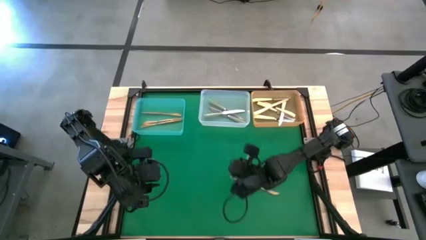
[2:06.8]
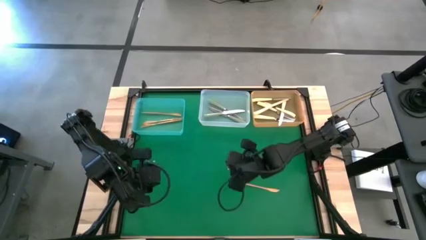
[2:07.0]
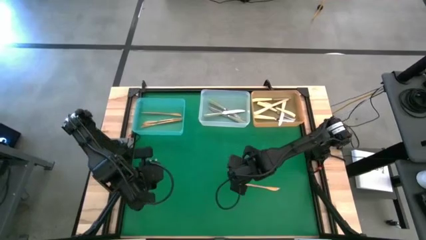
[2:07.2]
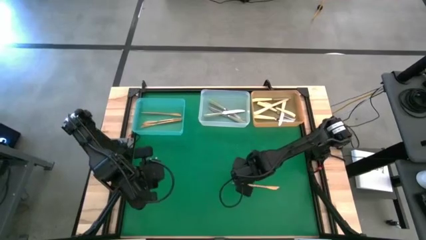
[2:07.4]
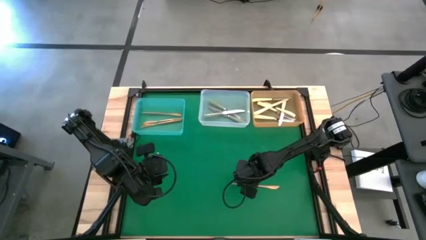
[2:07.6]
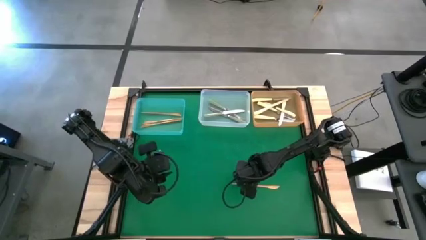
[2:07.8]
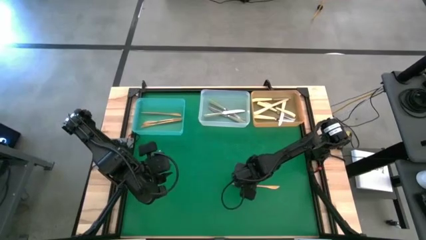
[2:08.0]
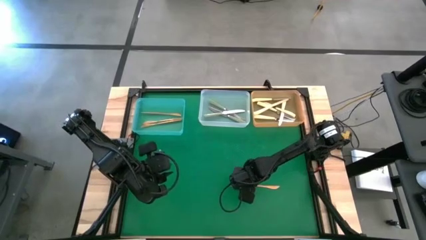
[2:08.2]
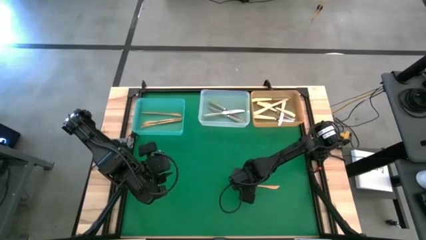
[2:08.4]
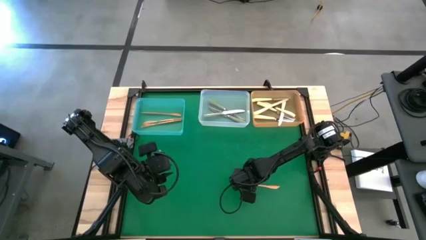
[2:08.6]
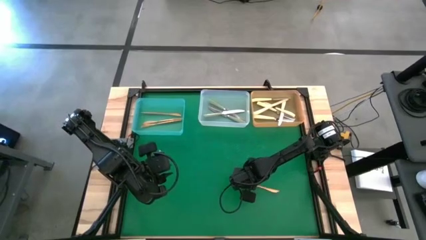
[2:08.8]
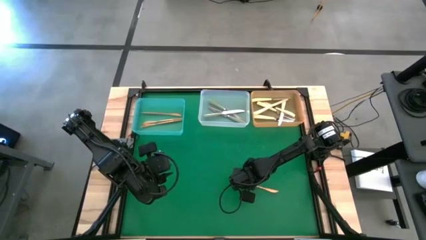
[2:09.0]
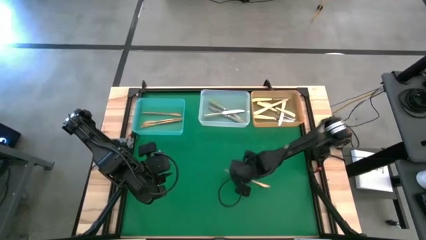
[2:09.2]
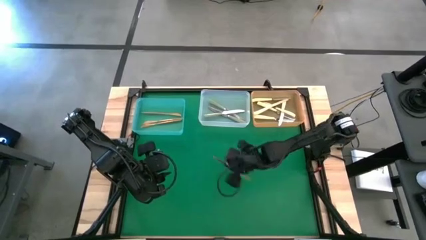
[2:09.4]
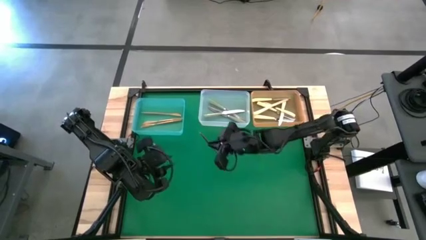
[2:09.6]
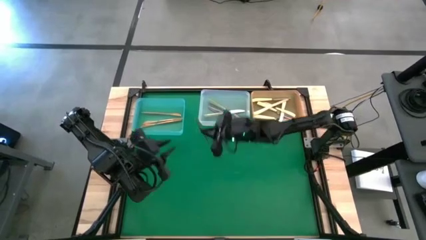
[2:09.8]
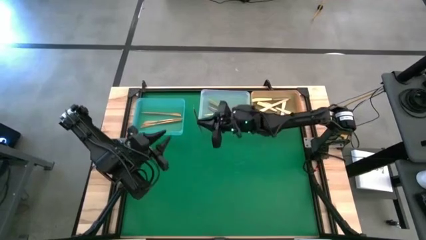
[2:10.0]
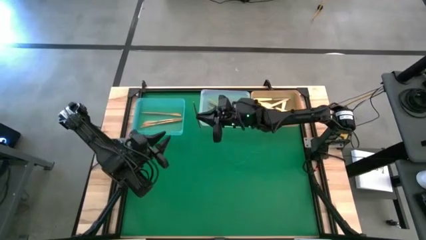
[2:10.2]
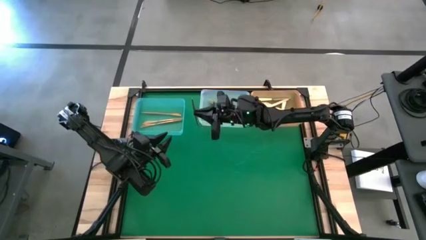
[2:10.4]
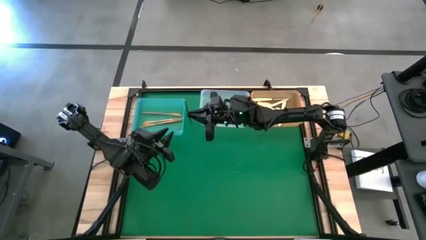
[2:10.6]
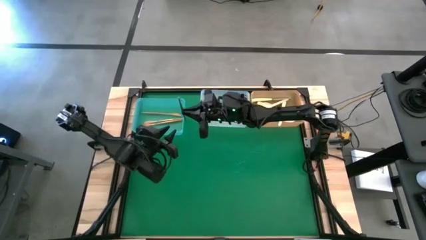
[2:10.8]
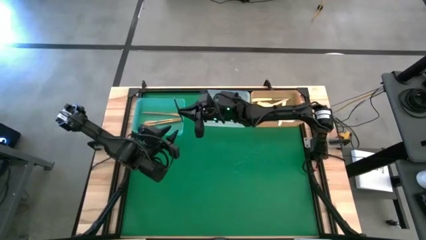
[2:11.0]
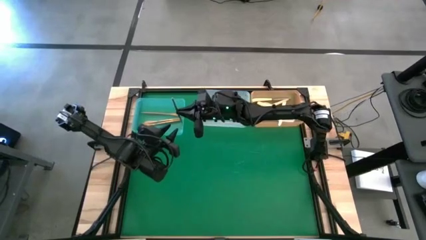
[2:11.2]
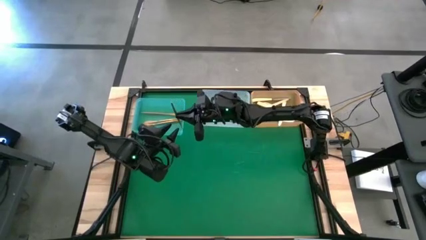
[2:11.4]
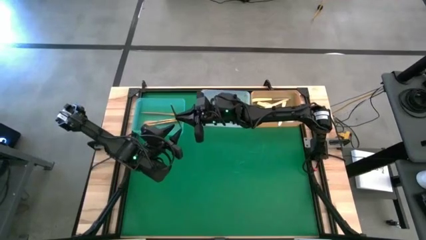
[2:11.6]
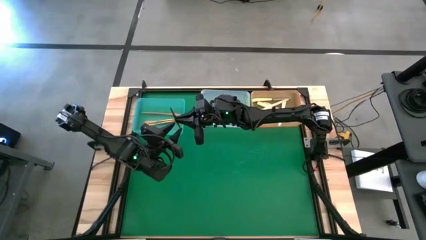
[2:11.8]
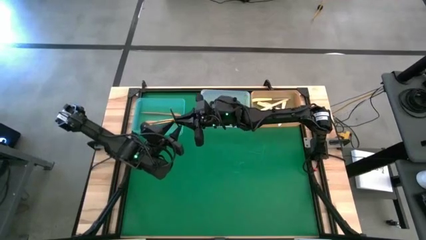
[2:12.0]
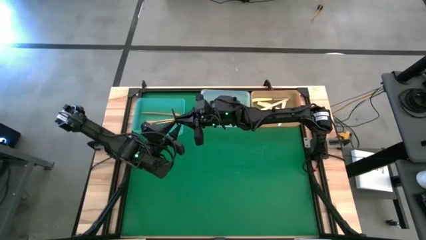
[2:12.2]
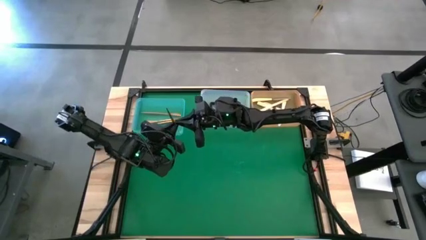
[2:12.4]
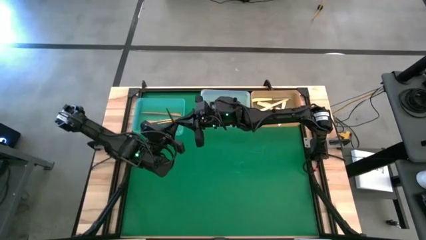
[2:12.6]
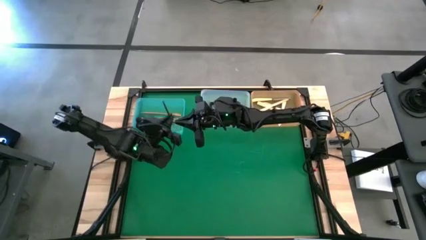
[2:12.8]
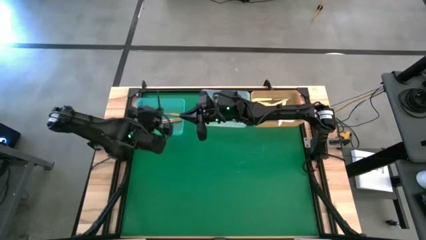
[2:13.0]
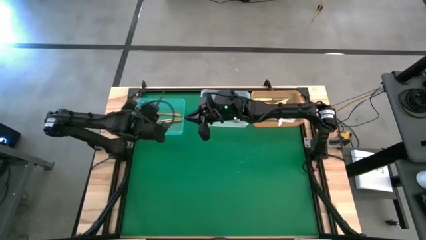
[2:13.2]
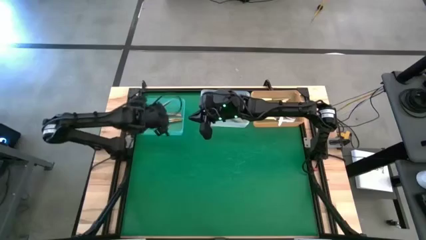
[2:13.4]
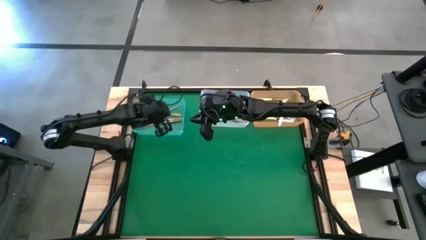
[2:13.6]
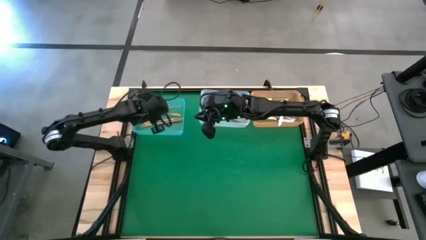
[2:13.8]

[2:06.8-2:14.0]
Task: Sort silverware by color (type)
Put the gold knife into the blue bin

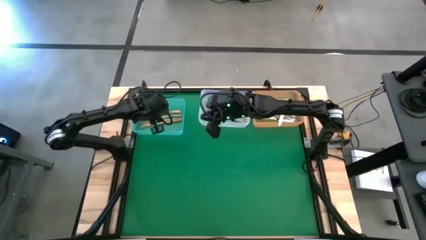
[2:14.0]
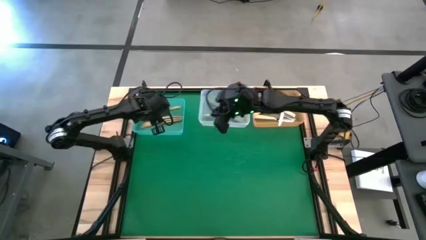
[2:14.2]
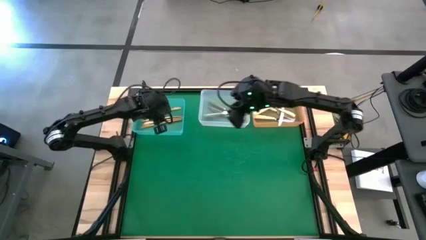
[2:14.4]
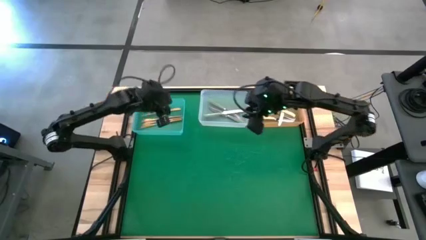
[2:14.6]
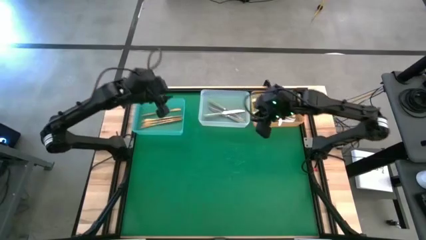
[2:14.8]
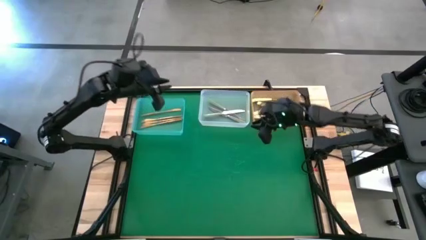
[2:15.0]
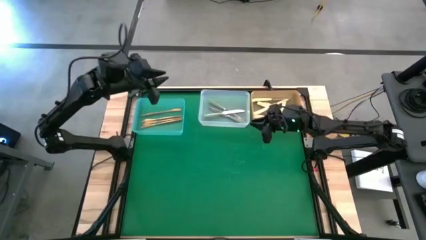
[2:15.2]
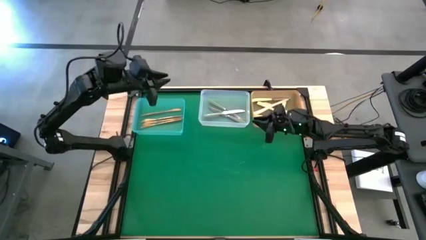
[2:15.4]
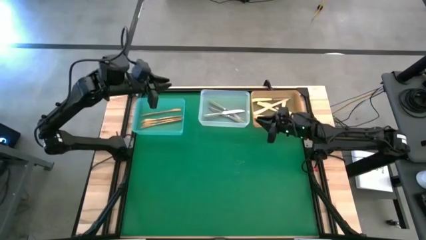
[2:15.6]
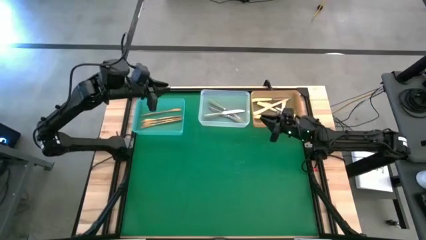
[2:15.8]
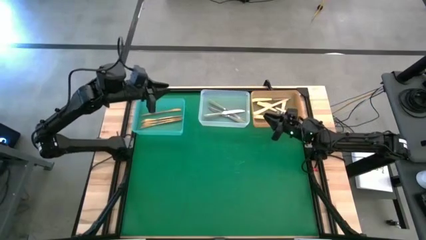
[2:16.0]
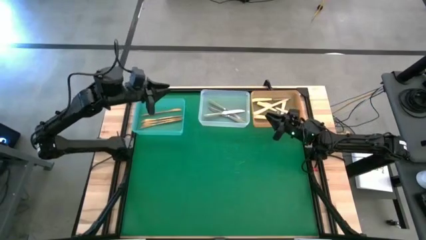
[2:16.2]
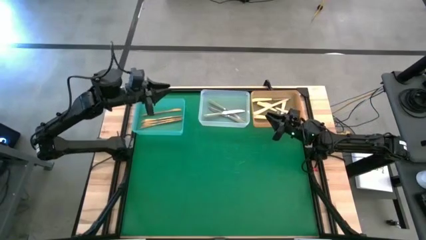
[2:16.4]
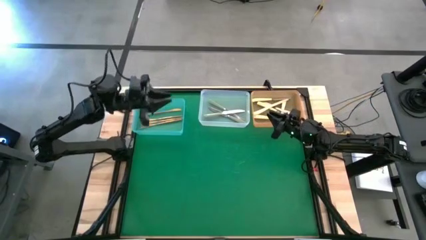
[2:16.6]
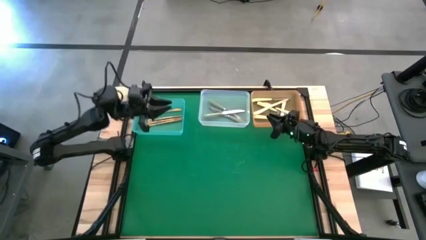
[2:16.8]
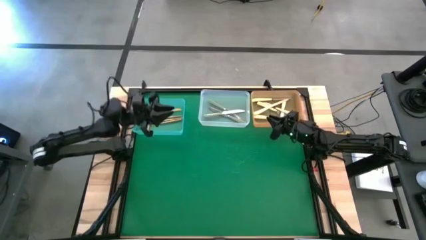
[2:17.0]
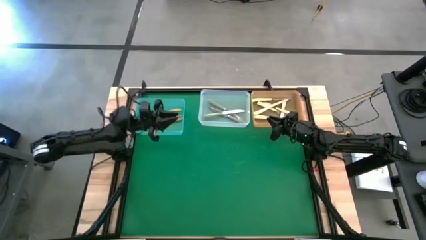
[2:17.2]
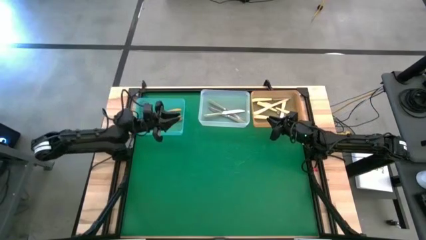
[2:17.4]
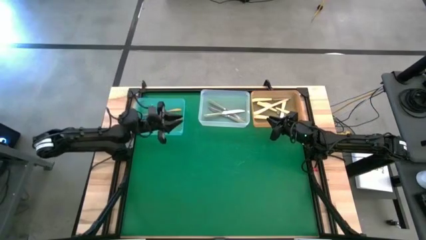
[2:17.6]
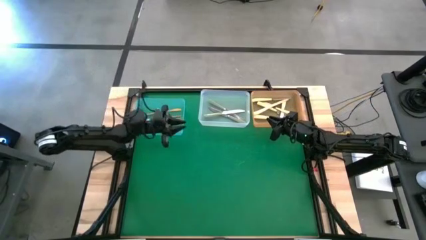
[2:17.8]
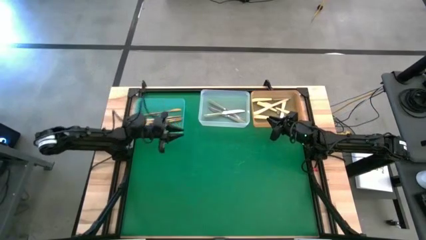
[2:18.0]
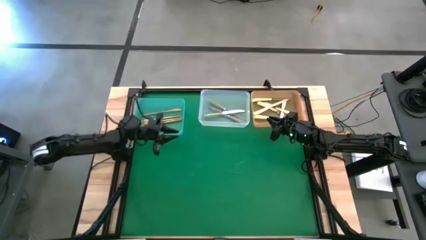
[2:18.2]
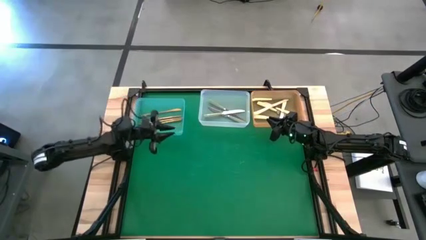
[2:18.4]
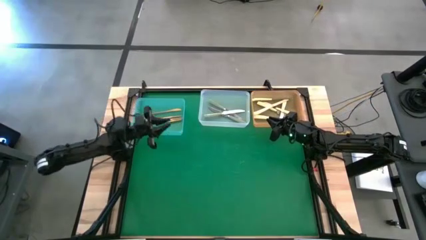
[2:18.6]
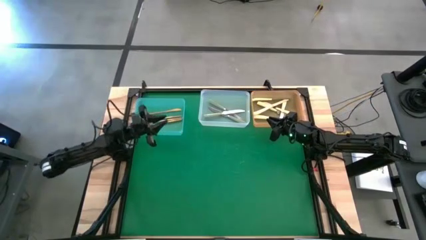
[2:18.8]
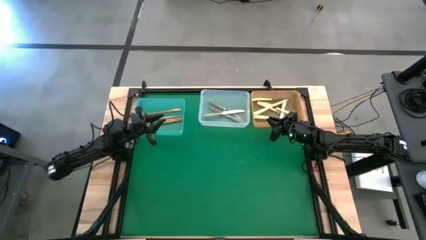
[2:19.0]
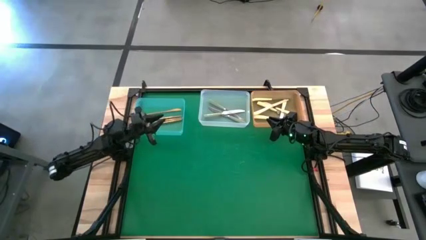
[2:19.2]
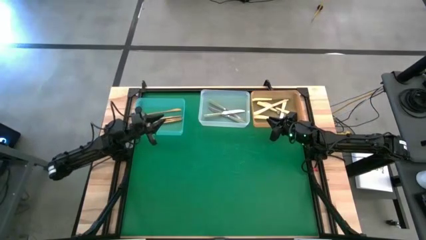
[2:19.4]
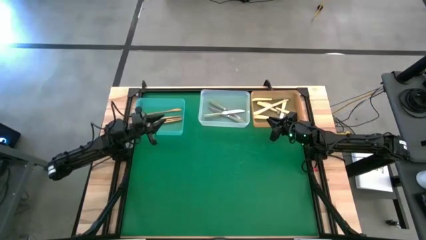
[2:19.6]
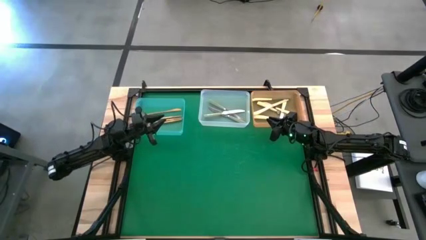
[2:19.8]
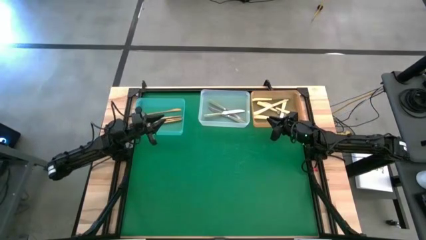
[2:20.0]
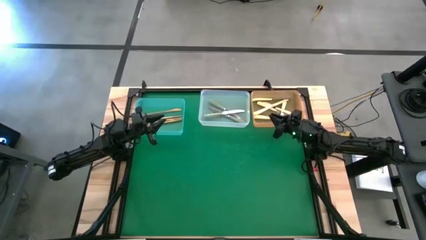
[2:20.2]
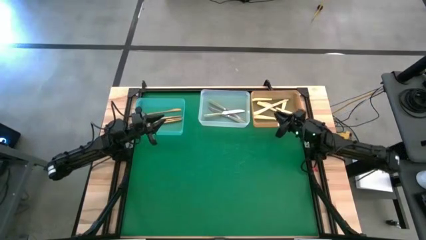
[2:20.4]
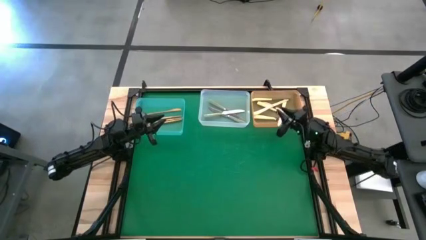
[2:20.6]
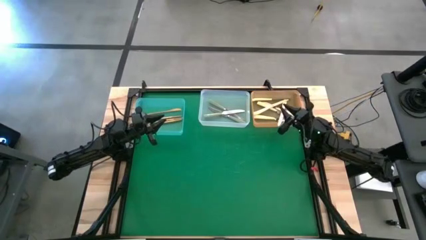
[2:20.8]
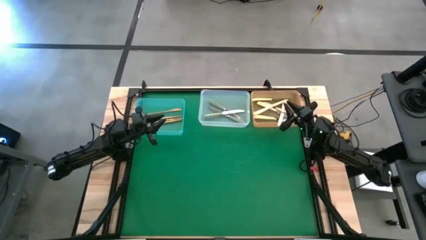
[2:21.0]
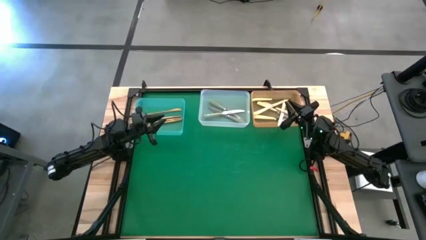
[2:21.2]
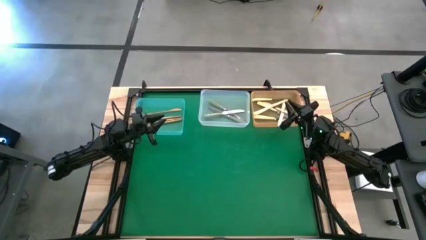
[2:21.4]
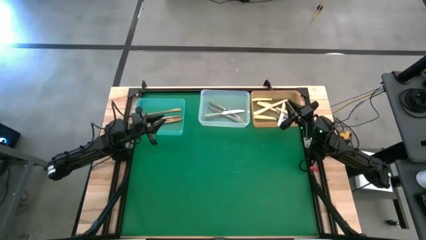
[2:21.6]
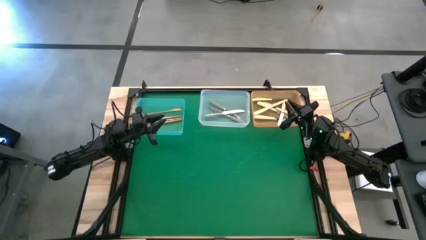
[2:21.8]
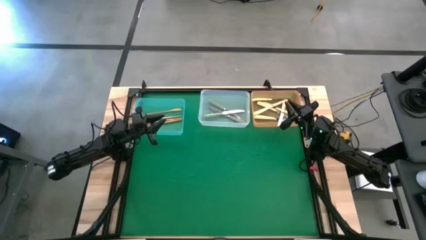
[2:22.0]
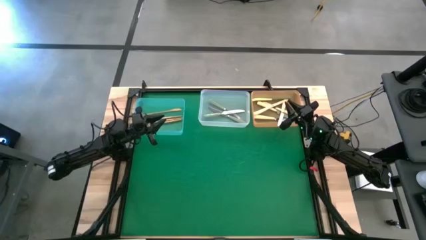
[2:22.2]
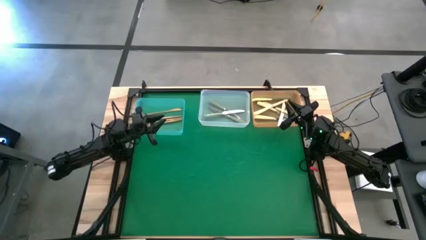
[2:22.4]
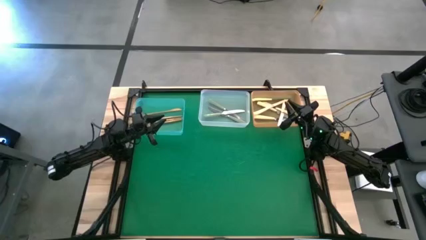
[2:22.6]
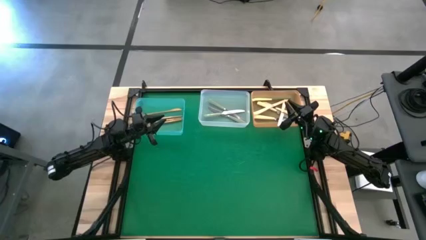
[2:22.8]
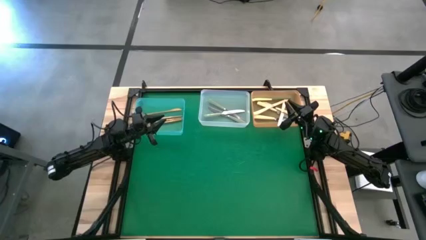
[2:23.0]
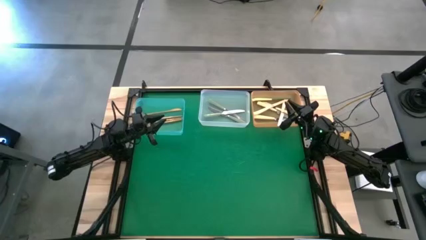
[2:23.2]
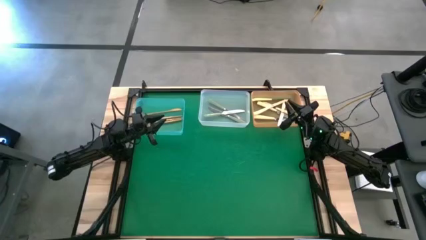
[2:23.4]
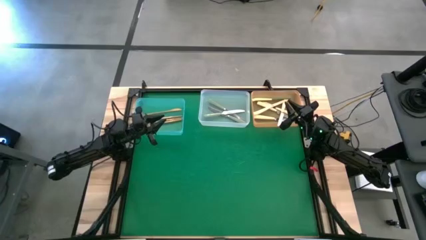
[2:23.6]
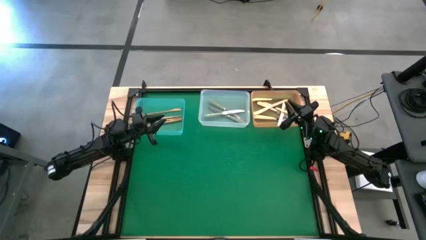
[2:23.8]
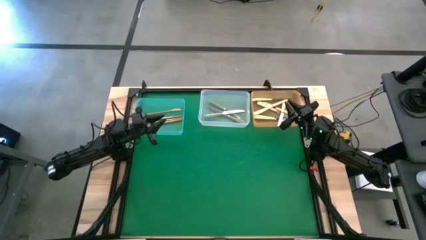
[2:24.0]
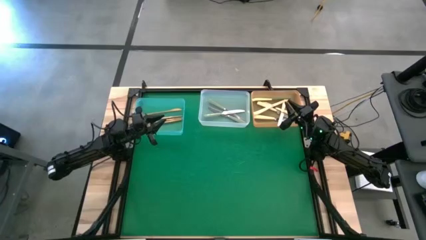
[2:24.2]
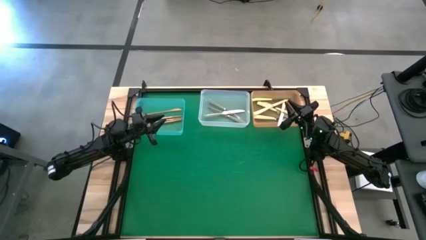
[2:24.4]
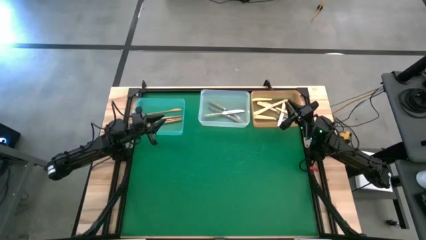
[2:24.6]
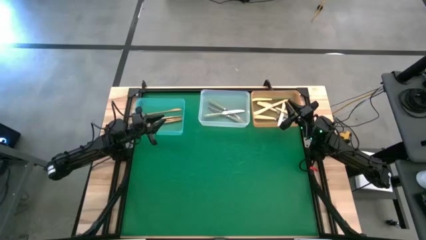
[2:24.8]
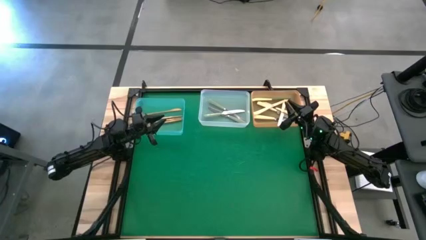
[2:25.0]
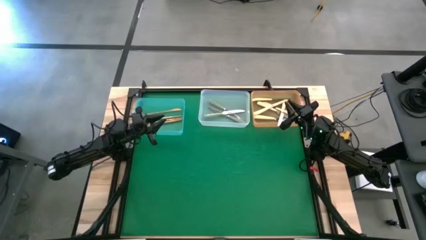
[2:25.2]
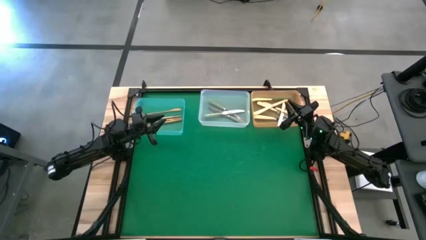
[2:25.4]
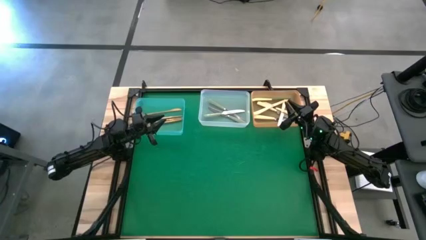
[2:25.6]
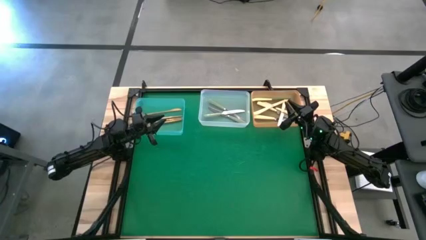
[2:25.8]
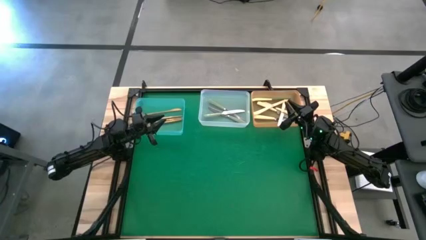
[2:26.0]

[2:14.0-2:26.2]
Return to Home Position
